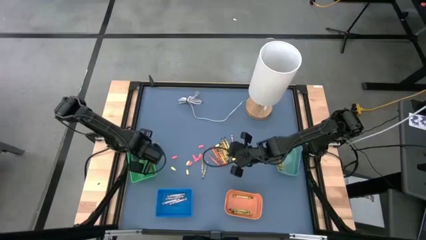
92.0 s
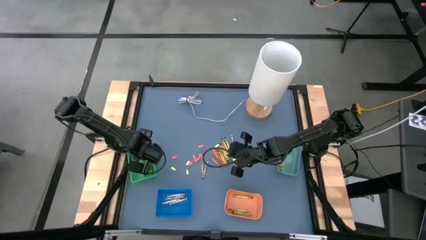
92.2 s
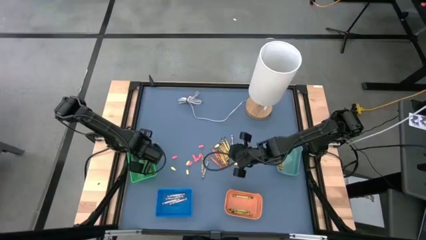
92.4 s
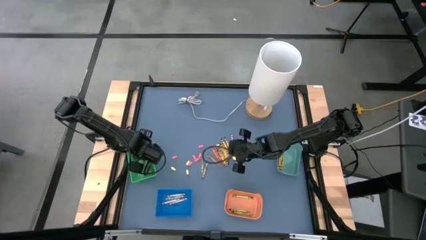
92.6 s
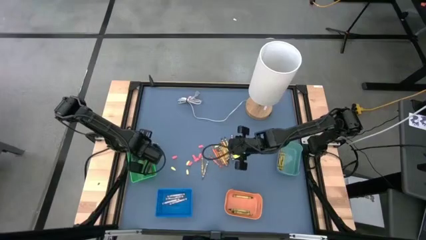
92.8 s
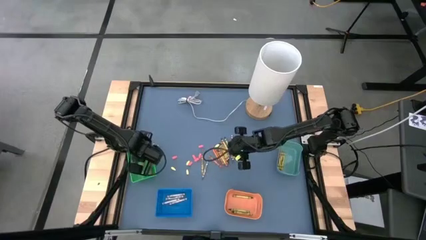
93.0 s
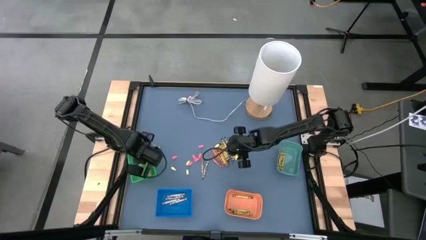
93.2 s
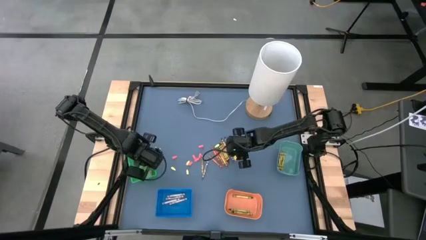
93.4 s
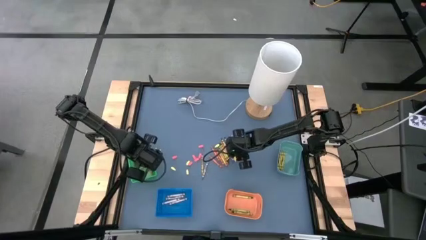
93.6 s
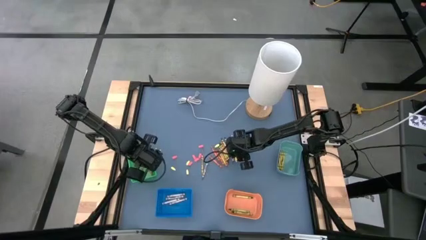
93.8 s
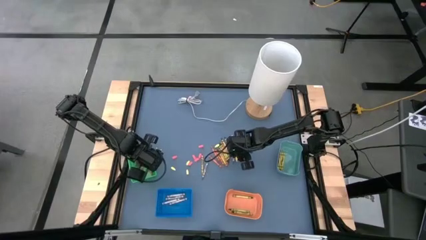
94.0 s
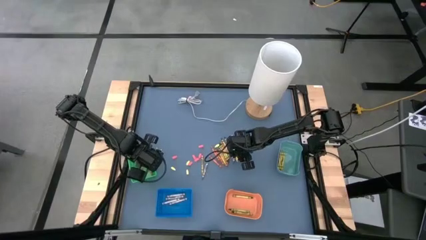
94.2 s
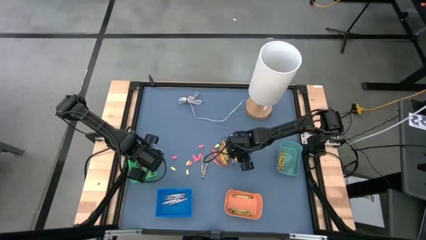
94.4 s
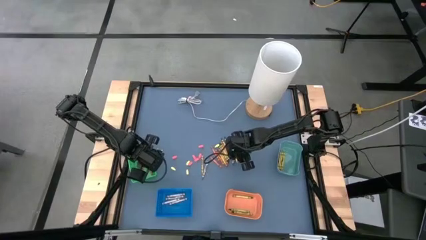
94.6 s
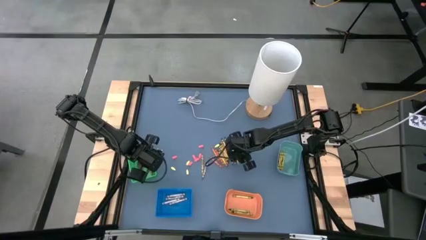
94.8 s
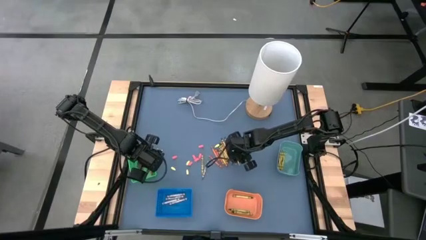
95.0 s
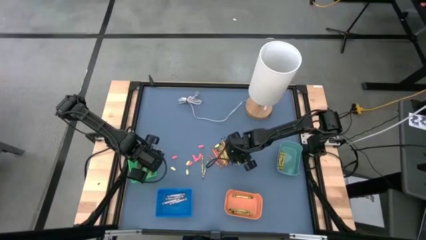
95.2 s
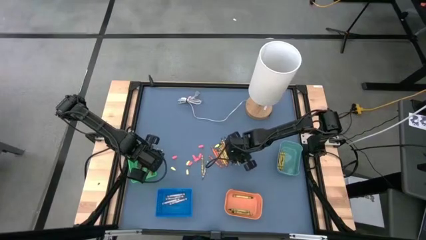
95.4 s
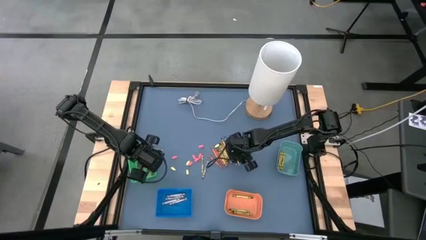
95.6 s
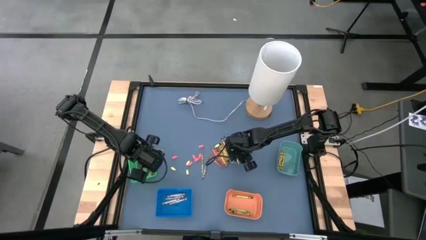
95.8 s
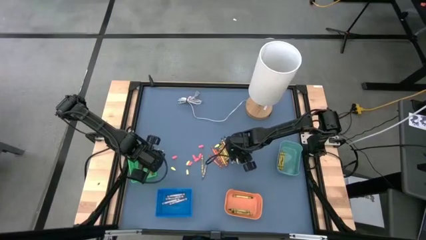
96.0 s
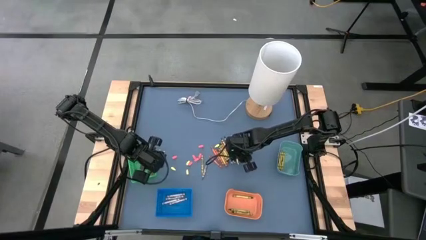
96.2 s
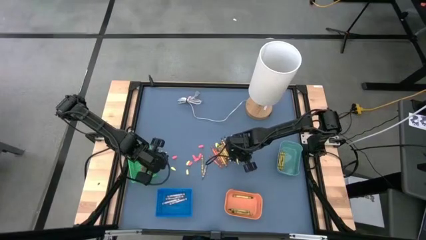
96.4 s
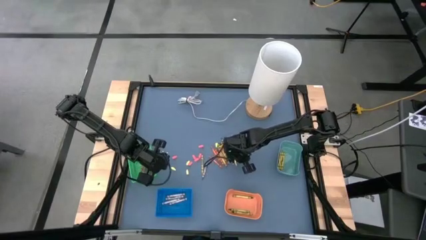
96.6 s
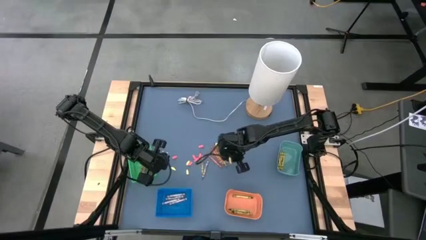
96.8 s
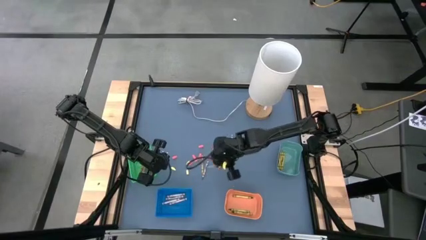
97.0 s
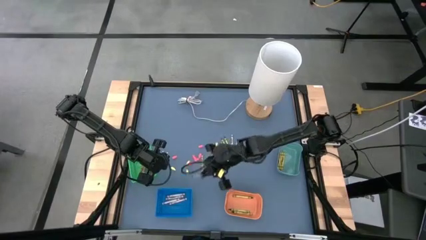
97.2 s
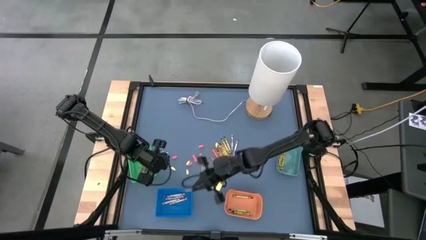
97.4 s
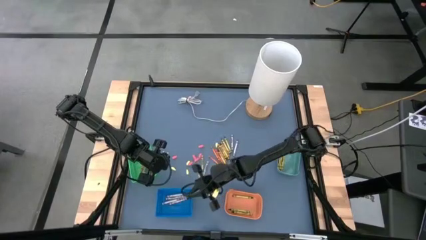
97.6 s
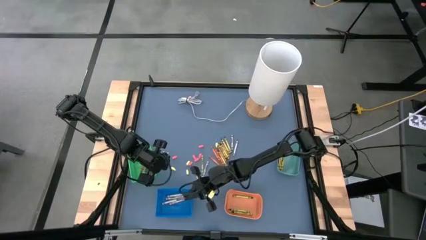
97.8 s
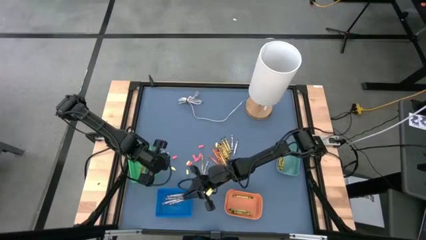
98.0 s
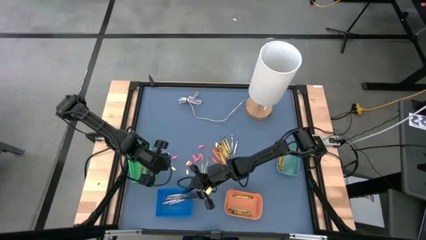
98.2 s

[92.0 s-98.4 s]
Task: Sort crayons
Put the gray crayon into the blue bin

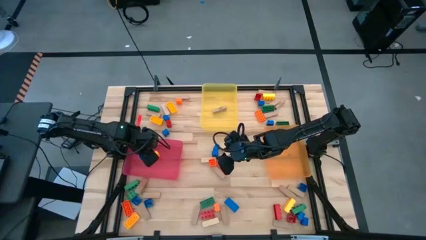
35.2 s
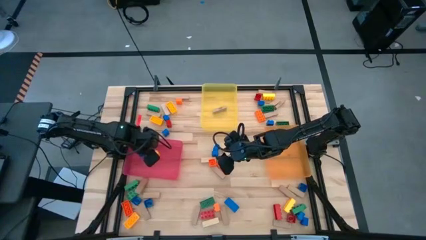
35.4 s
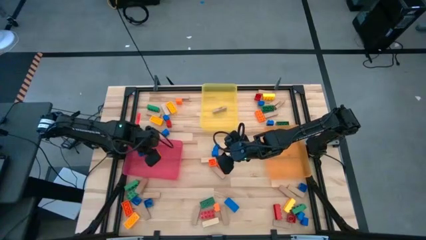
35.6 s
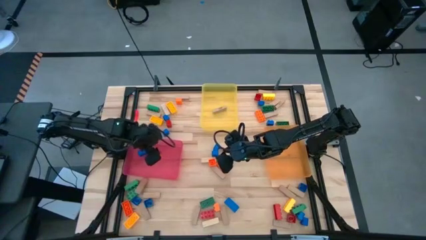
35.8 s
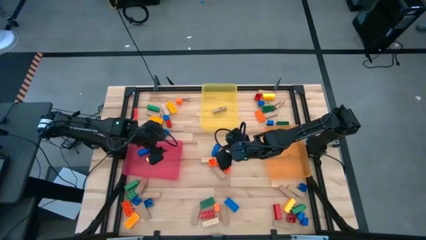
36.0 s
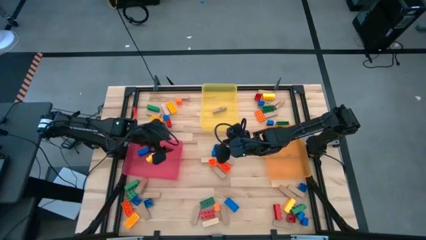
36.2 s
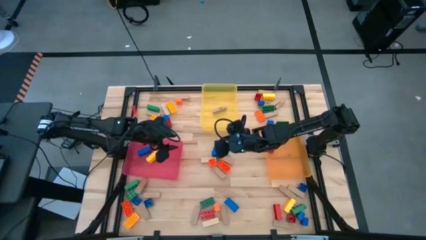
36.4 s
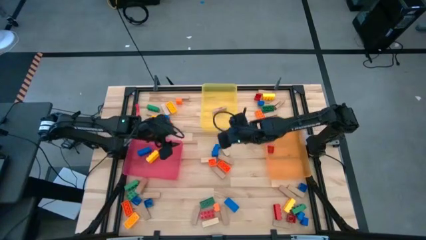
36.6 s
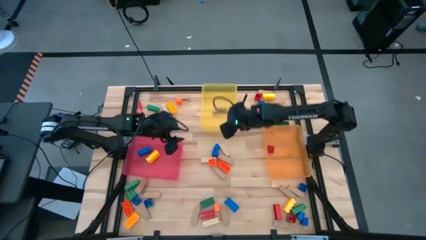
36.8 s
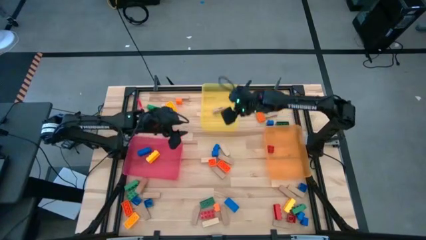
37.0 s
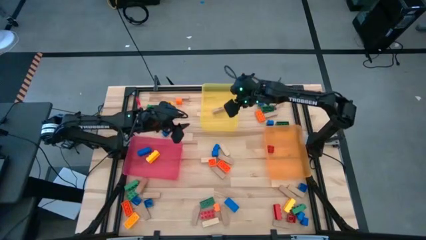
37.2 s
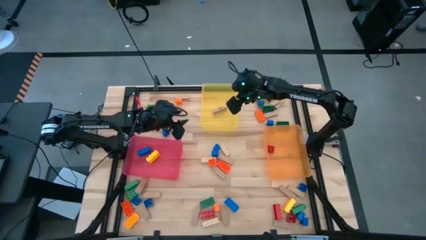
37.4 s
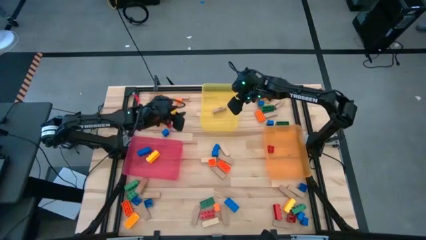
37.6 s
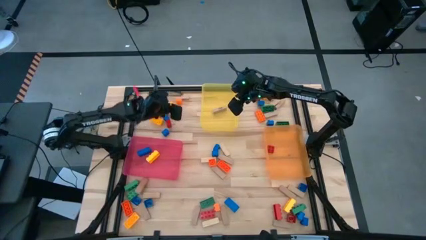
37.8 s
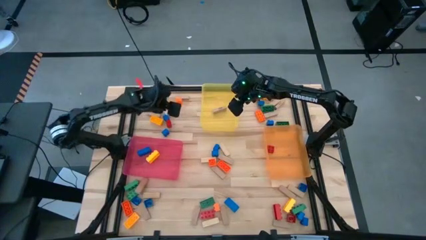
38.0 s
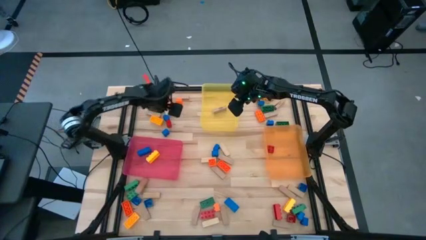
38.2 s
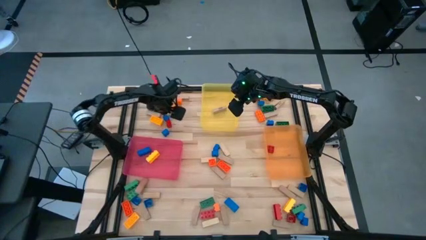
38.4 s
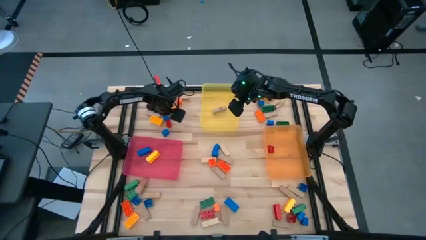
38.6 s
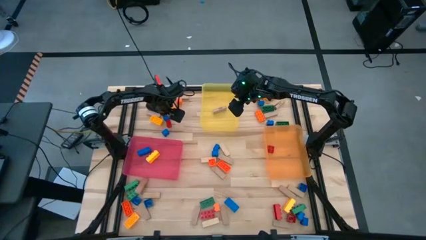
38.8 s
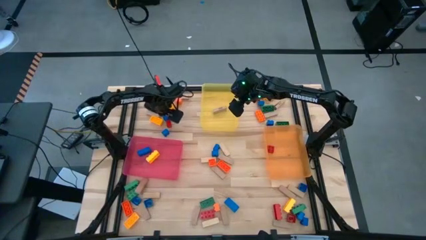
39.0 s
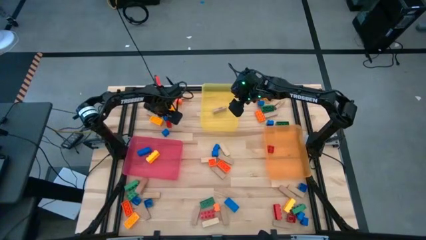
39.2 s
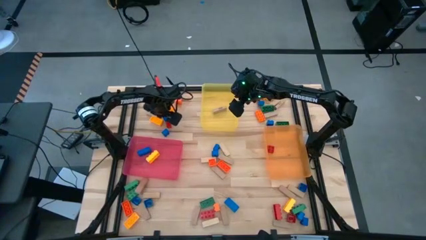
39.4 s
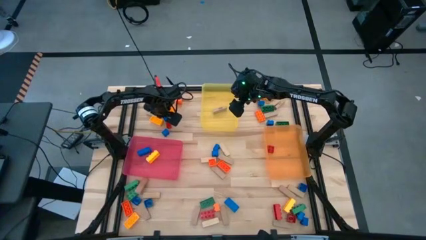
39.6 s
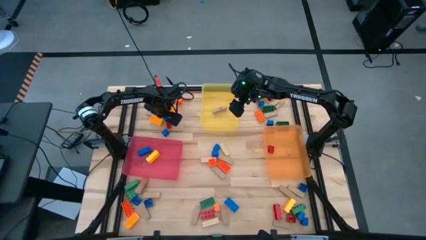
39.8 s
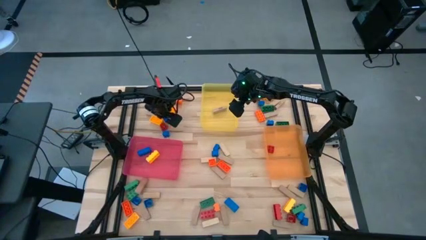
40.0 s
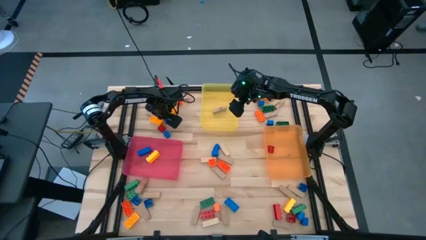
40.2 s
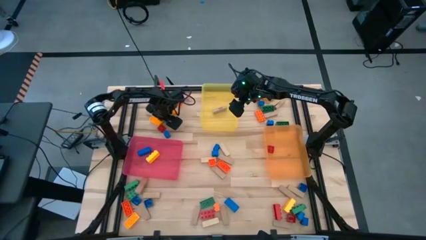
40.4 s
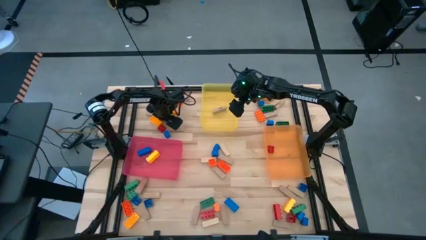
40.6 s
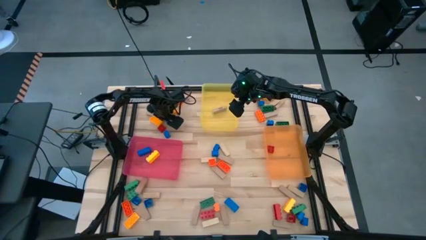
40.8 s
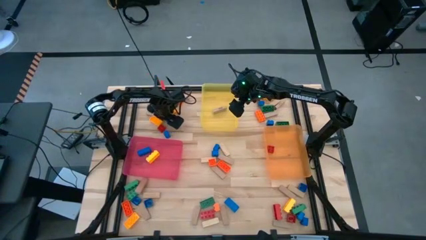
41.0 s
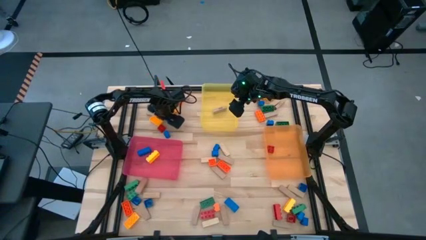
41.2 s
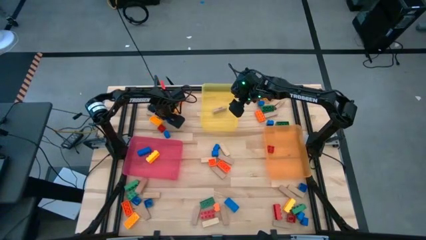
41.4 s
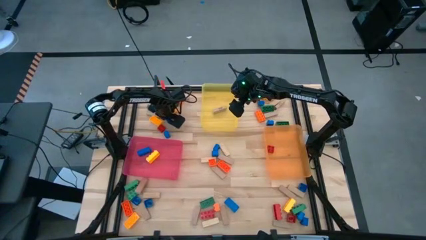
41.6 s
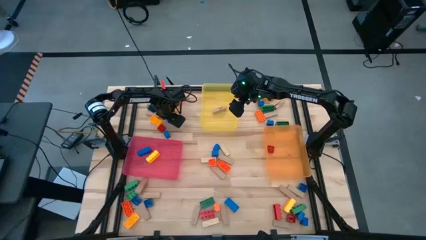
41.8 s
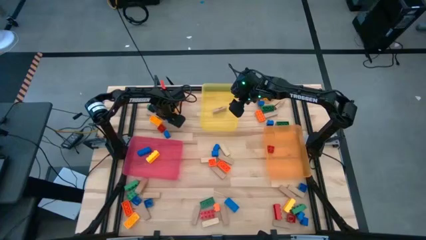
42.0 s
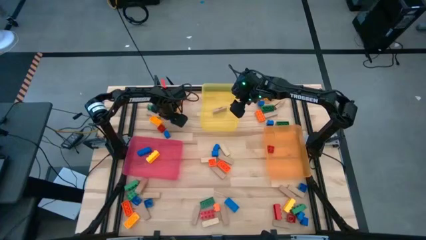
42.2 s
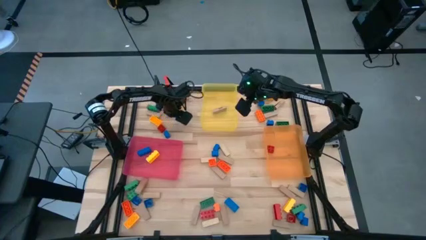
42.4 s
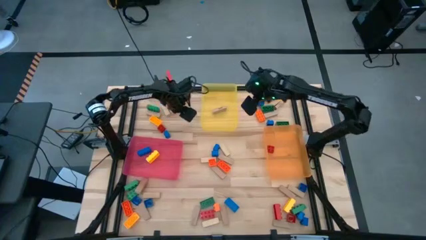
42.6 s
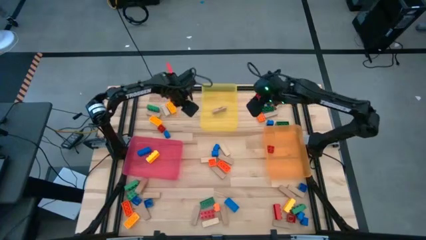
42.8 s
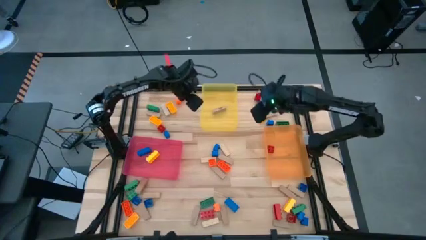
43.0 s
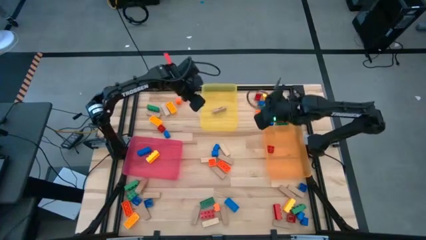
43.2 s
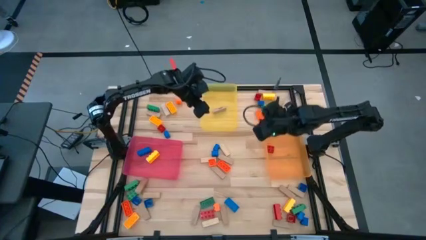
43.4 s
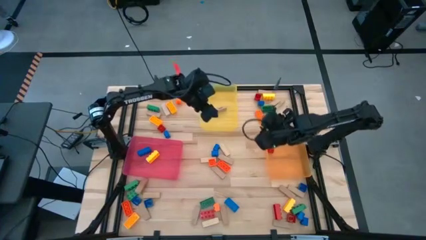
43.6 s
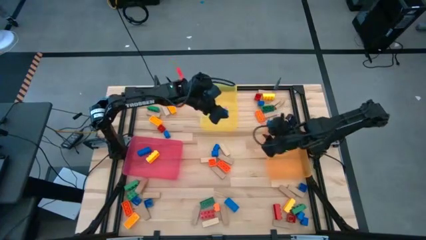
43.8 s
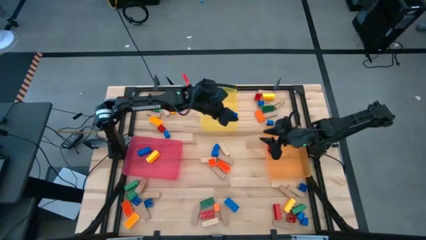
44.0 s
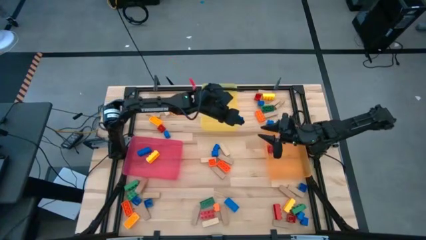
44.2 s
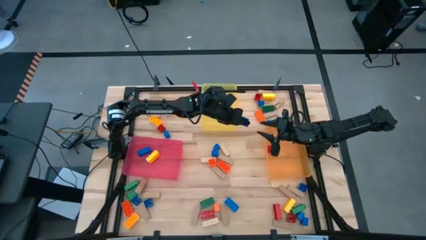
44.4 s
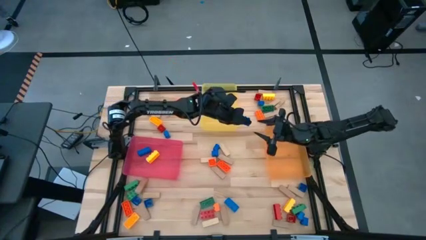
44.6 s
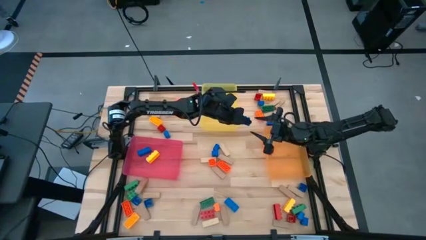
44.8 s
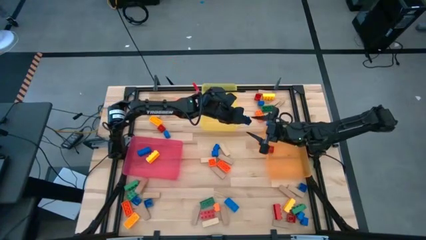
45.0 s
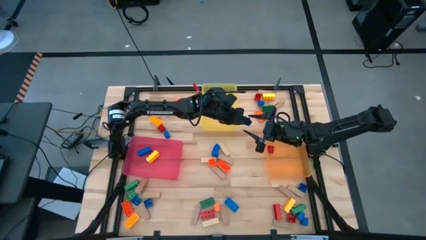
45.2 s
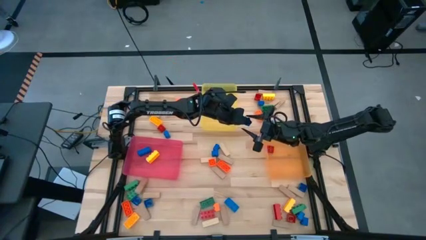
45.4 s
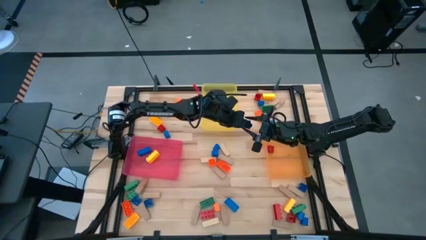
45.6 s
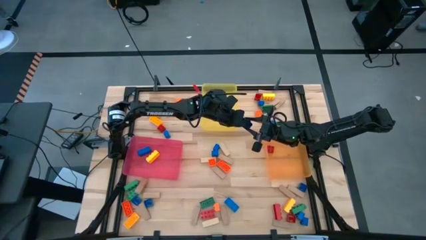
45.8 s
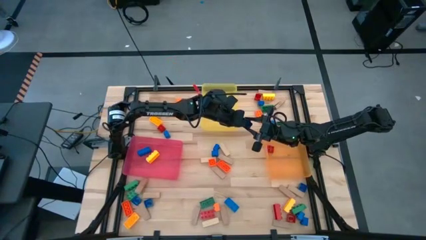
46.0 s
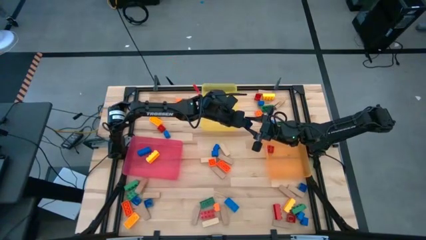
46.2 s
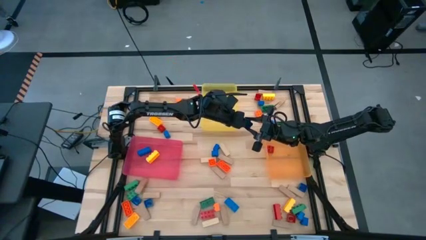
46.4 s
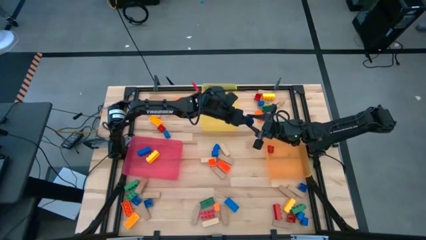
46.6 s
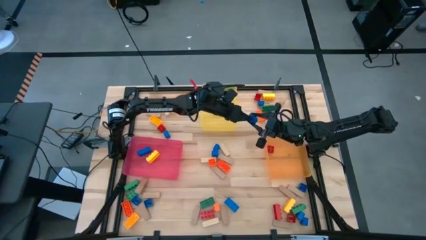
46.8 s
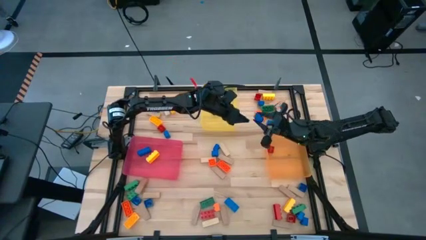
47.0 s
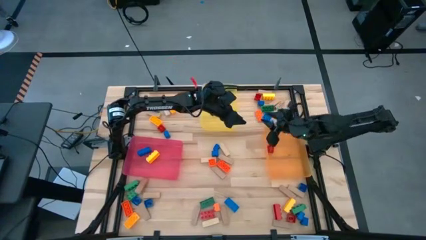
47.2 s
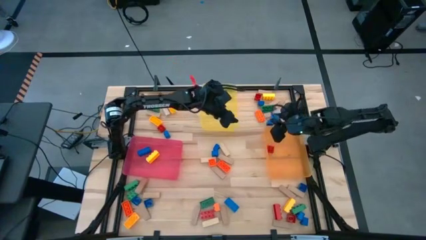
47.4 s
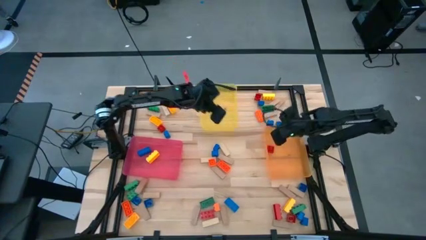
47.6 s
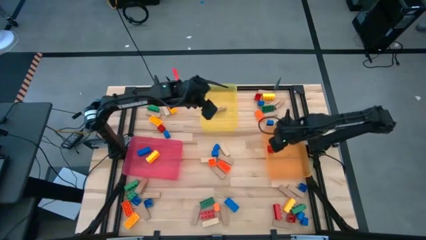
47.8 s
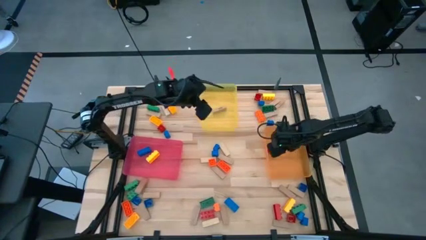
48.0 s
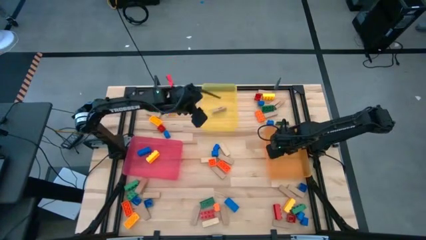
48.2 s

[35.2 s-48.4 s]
Task: Sort blocks by size
Put the 1 stud blue game piece into the orange bin
